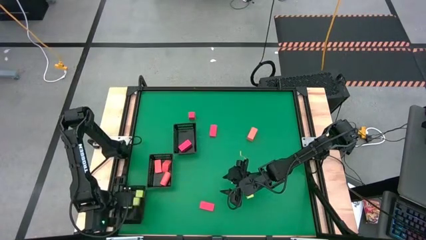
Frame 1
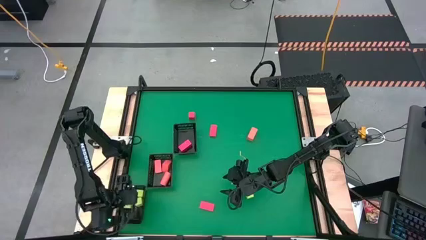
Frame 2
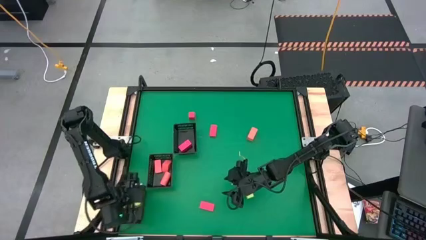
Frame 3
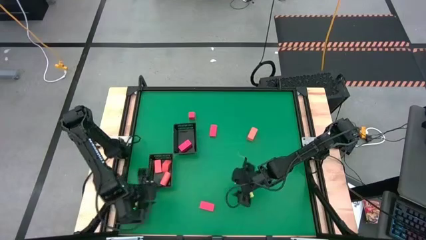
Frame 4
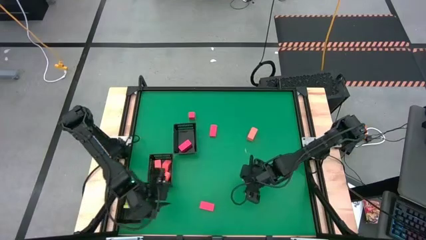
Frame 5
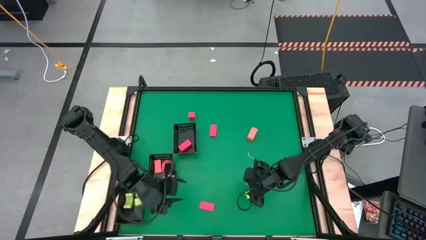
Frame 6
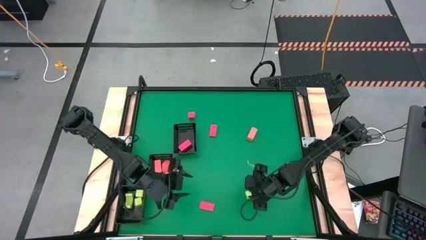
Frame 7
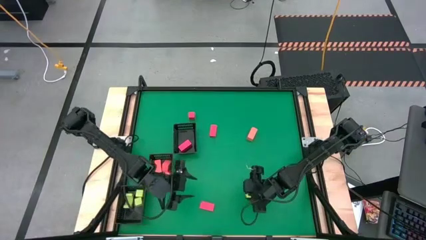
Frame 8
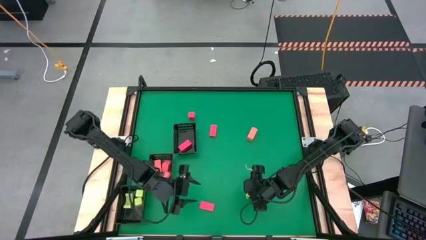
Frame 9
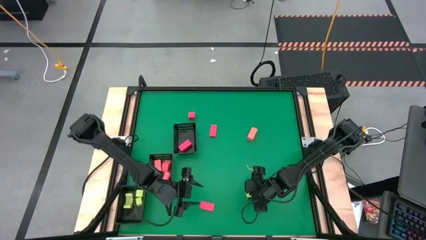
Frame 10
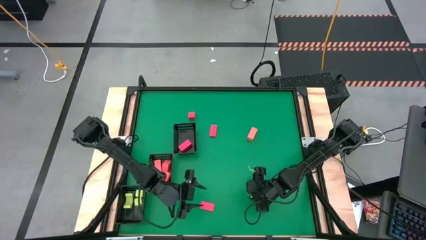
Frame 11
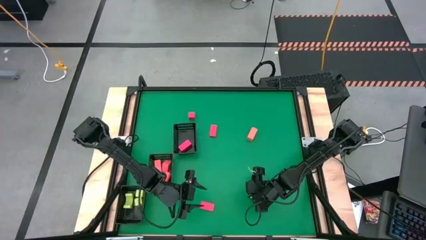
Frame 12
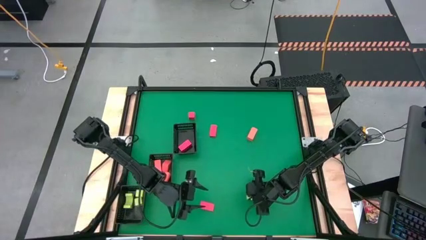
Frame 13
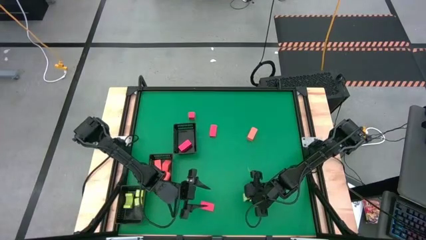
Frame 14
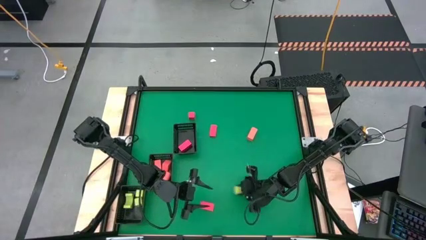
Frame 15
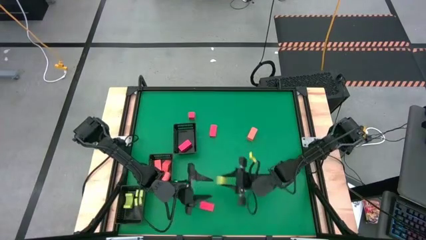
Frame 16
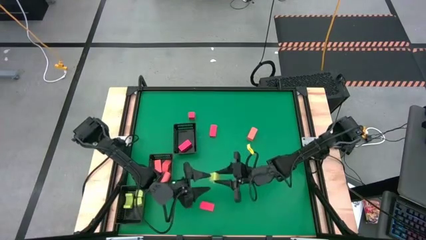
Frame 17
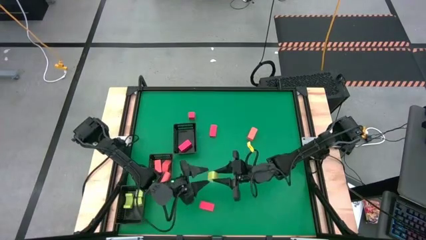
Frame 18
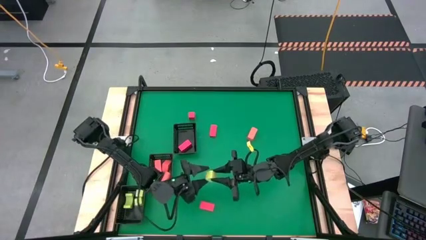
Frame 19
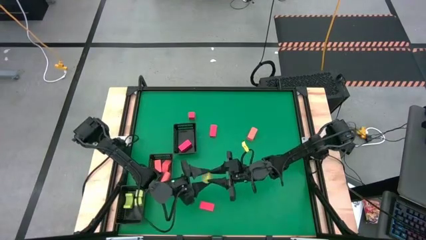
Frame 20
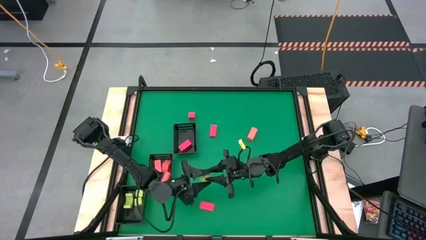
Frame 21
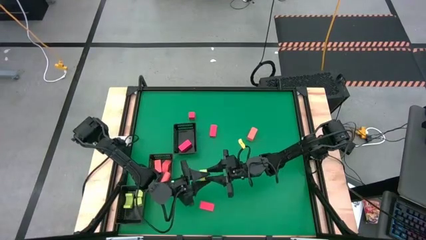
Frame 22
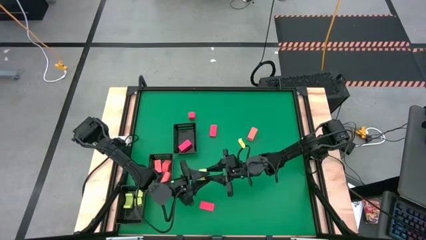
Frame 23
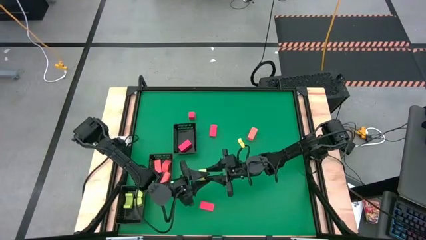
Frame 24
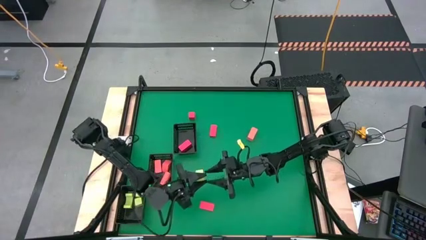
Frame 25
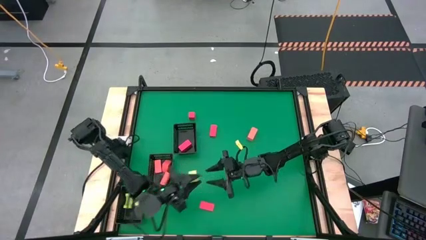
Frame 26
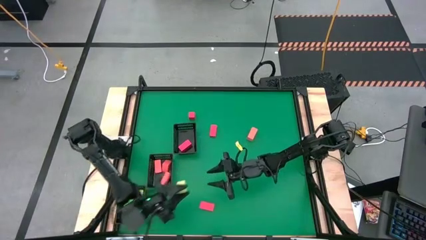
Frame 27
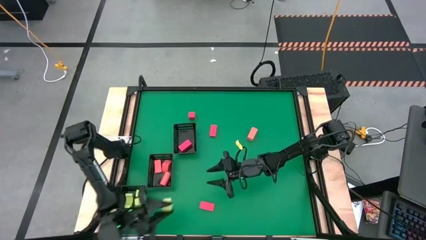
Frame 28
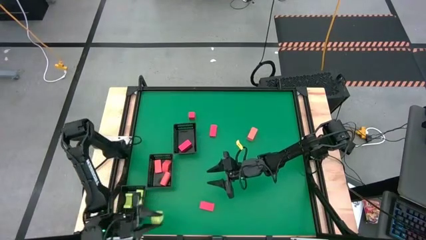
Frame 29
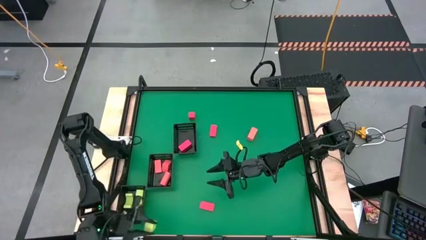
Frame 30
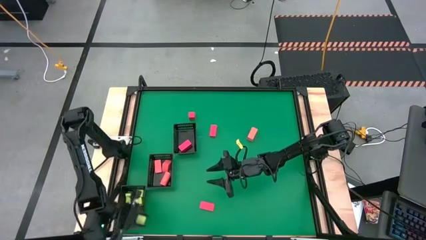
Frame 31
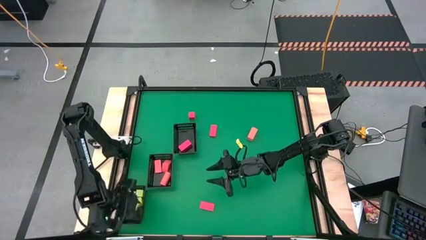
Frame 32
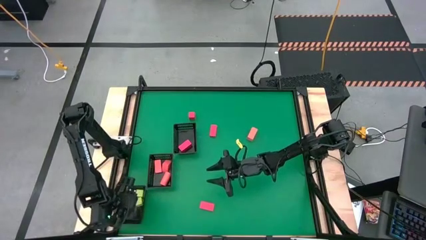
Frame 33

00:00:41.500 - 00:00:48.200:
Task: Sort & place blocks by color
Put the green block into the bottom black bin

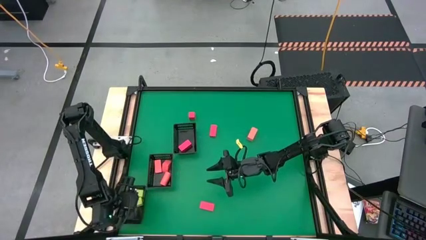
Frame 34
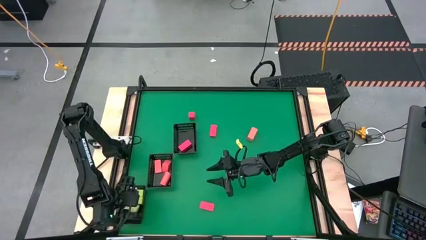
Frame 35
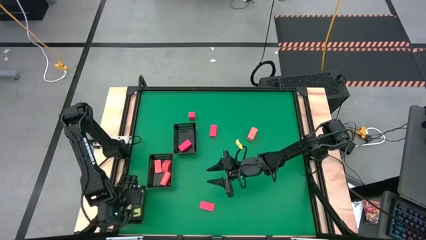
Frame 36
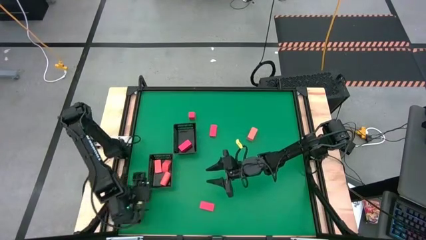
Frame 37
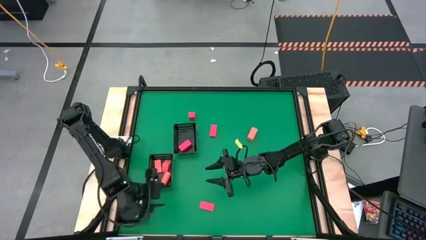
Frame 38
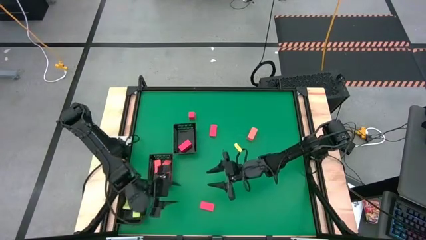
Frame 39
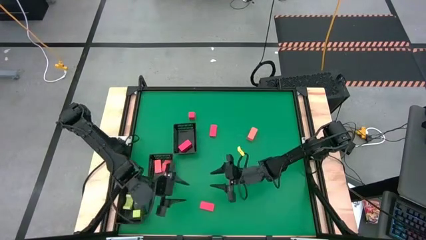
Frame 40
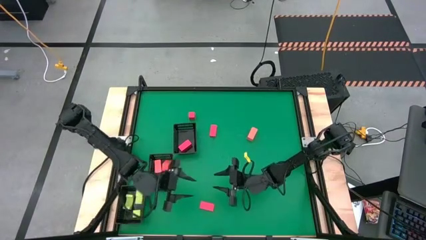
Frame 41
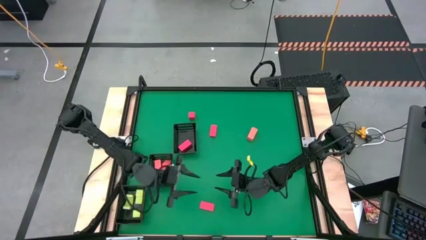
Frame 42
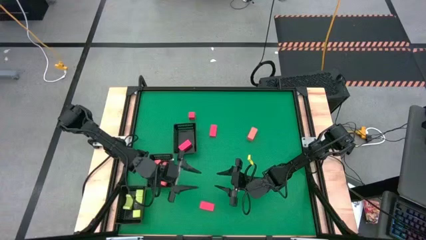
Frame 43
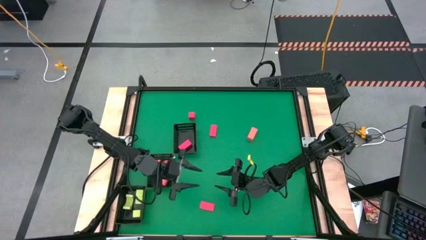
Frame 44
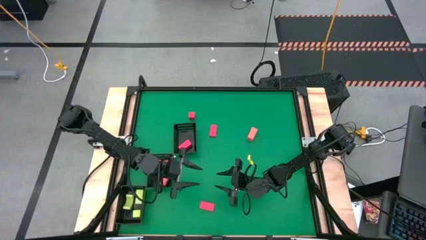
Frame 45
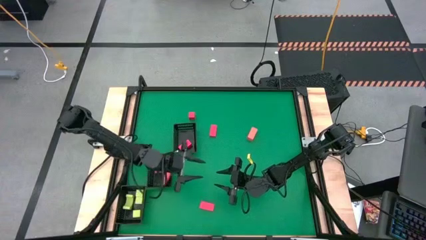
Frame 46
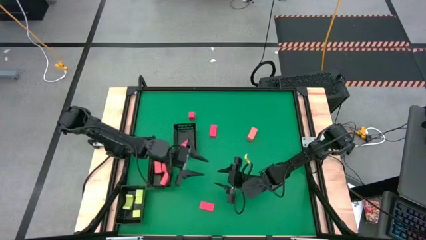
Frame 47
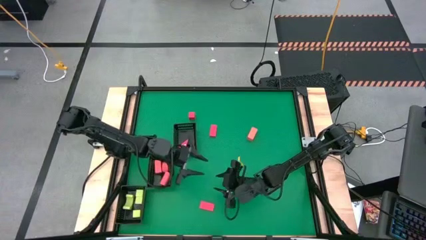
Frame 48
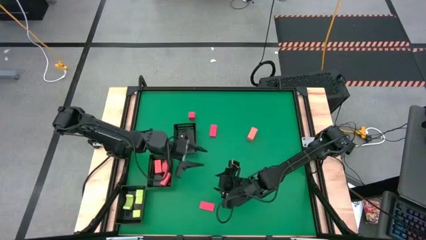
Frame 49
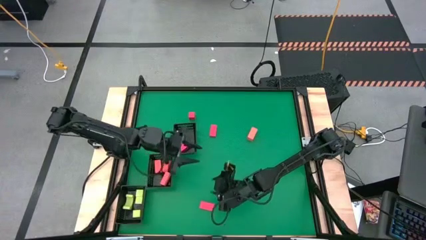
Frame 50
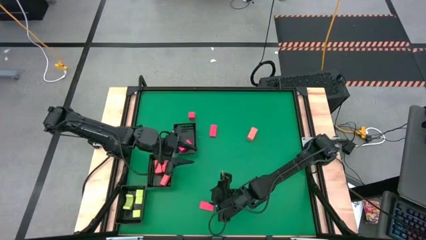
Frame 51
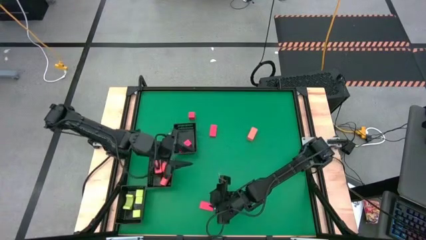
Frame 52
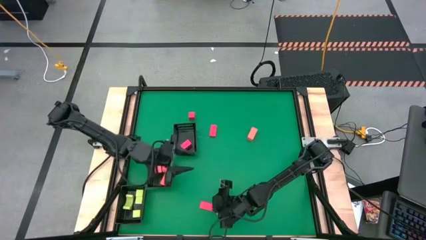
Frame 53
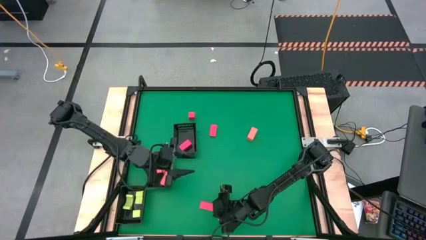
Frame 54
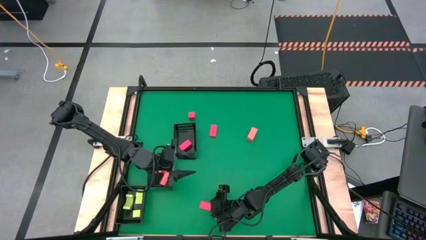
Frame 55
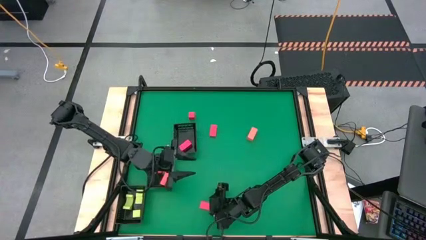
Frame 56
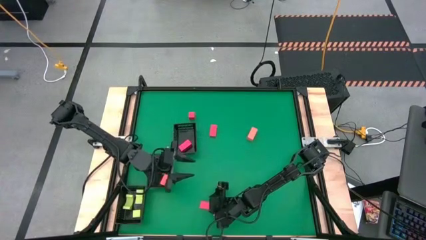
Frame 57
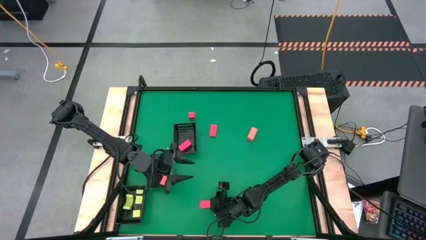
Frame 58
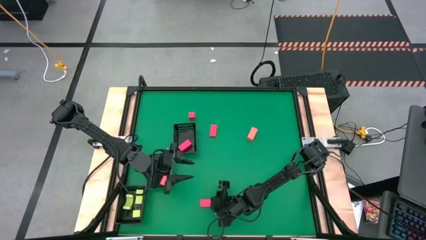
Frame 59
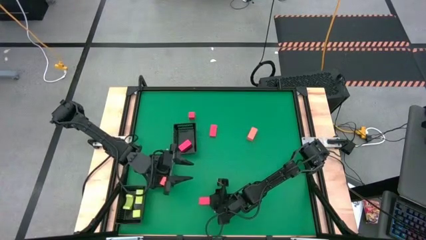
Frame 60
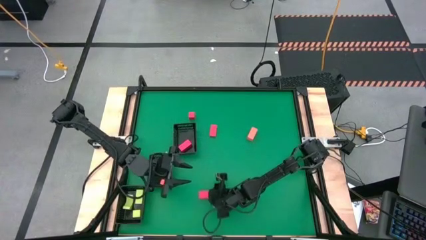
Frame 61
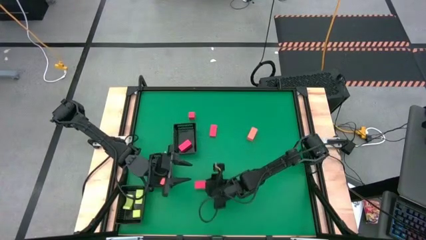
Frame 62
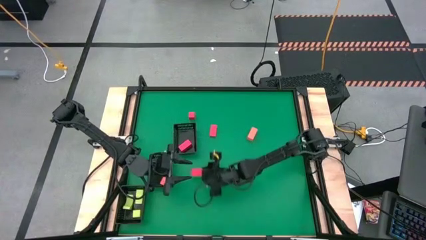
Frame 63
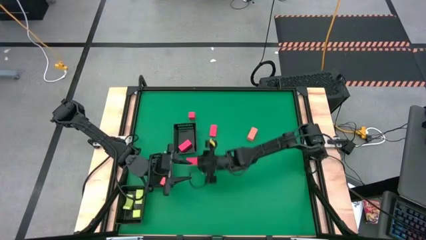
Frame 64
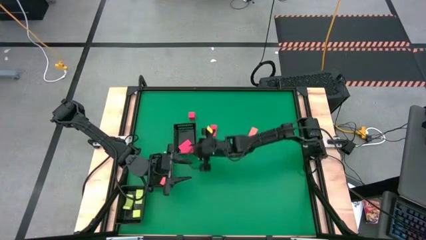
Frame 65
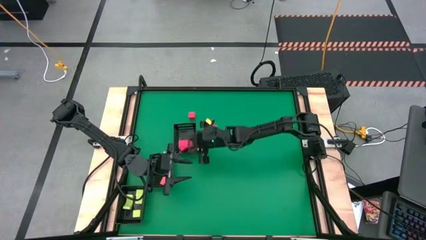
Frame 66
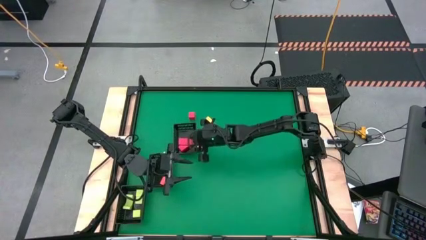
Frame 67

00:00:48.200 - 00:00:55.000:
Put the red block into the top black bin

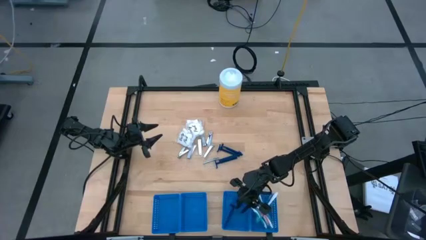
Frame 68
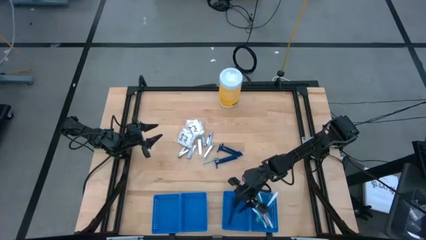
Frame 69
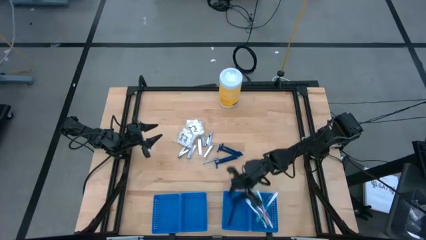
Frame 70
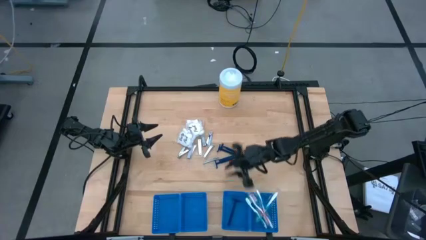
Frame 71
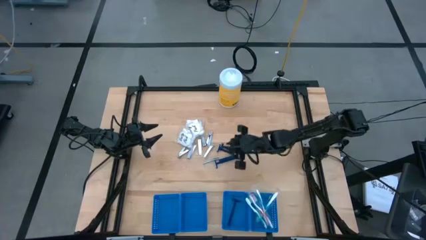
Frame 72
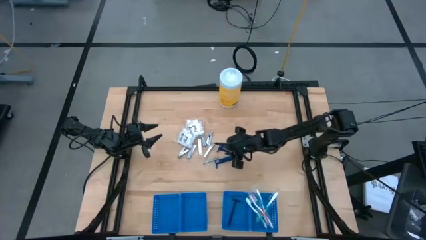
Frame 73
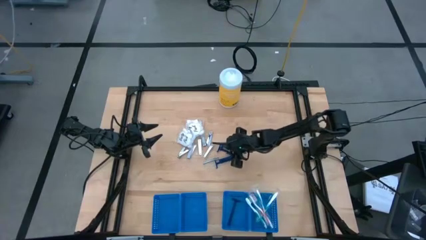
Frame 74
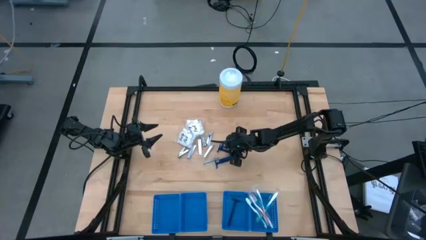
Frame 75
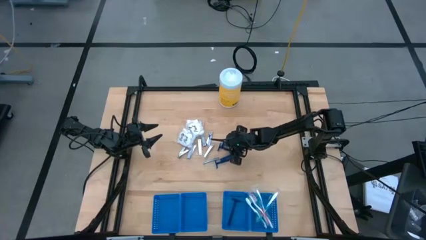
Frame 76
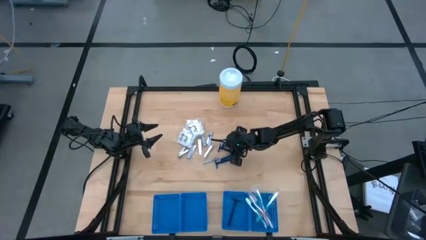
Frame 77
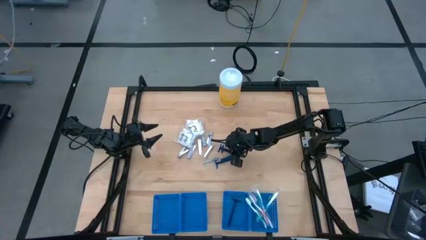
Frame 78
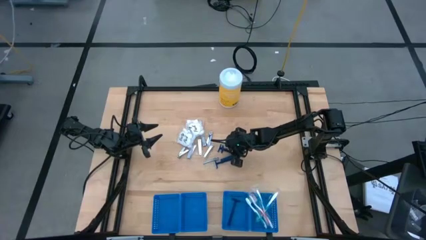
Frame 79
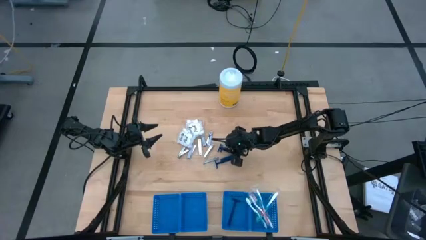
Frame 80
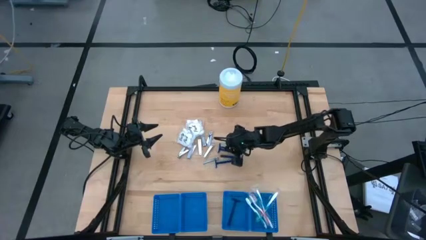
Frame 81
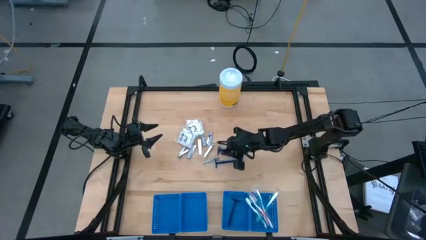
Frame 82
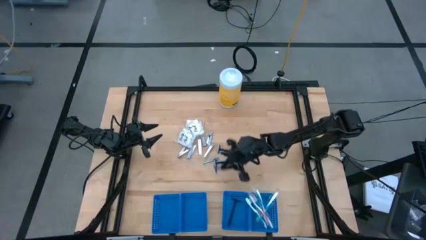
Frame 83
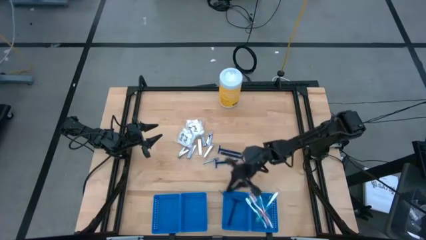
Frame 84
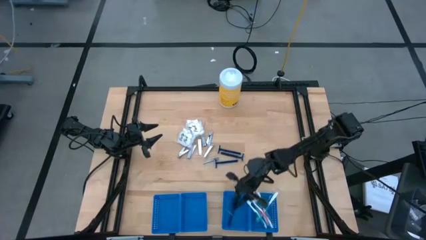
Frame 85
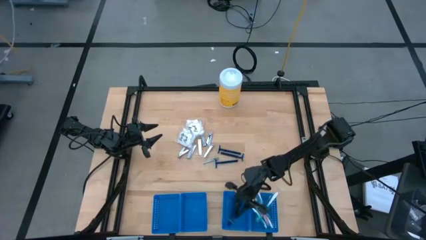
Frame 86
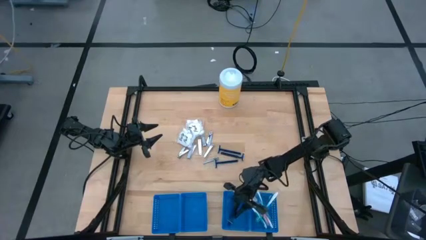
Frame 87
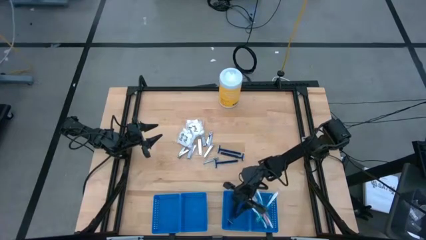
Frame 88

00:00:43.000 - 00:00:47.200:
Task: Pick & Place Travel size toiletries
Put the blue razor into the blue basket
